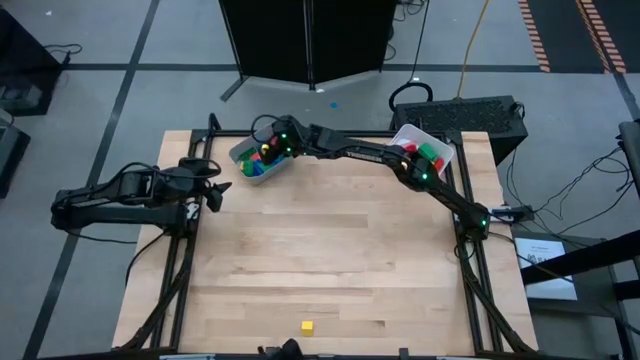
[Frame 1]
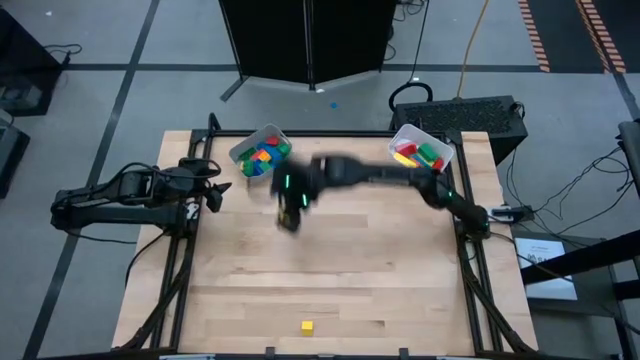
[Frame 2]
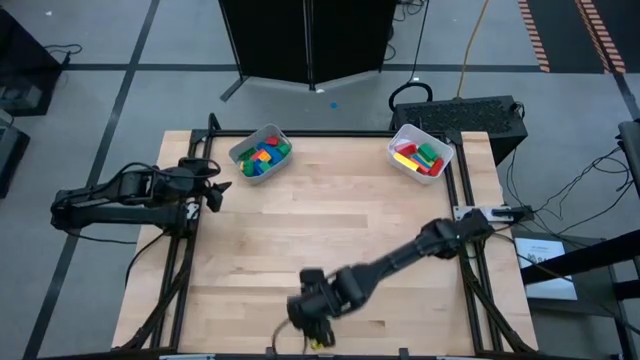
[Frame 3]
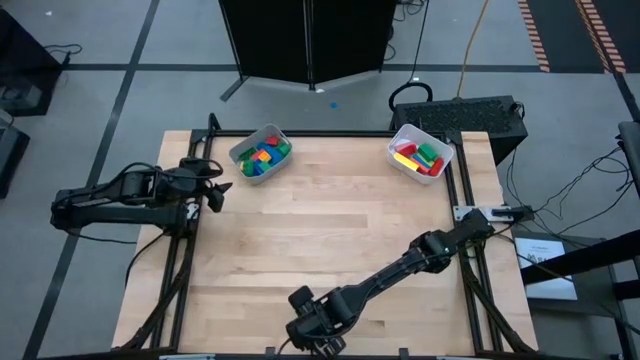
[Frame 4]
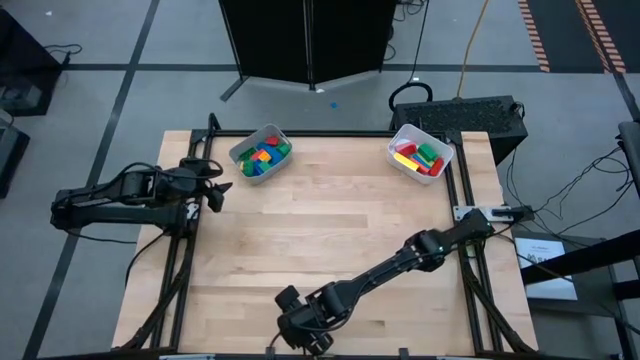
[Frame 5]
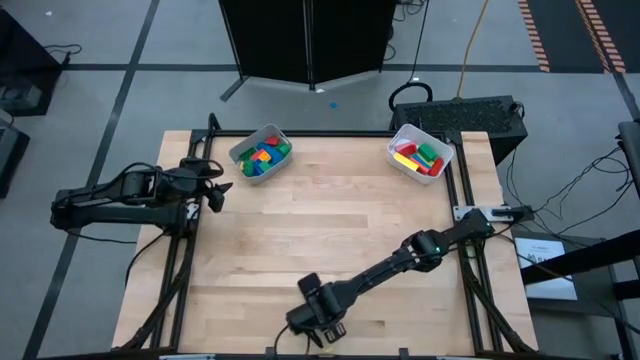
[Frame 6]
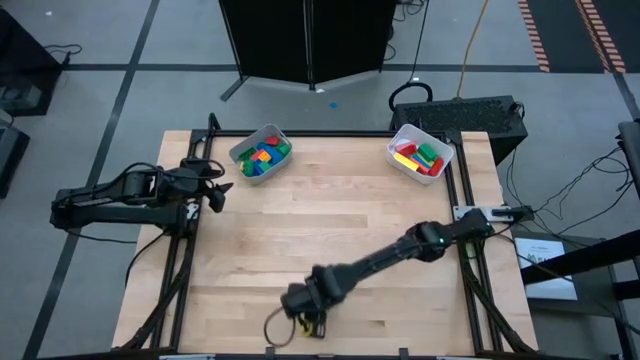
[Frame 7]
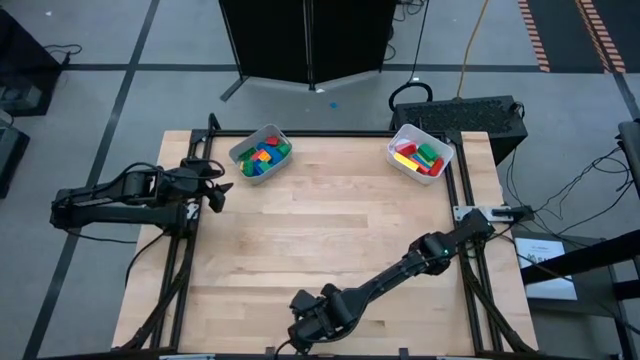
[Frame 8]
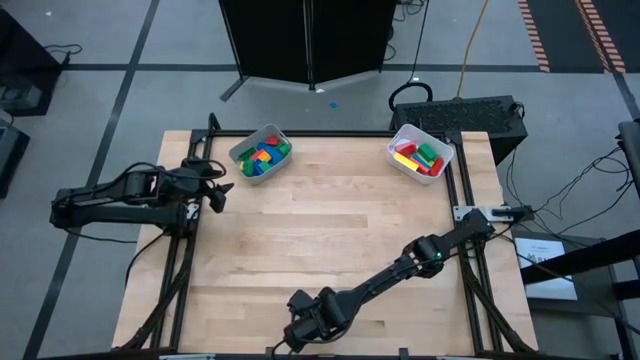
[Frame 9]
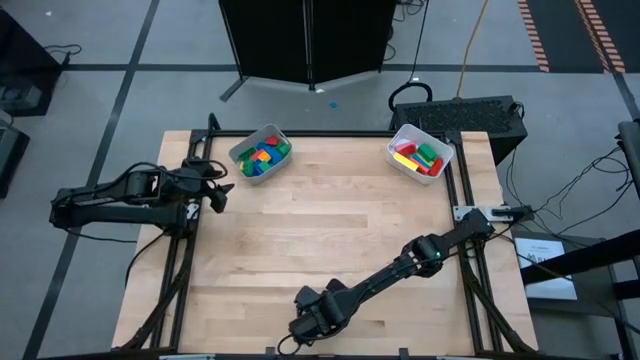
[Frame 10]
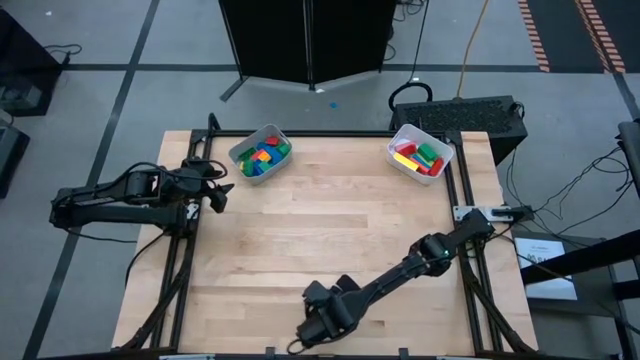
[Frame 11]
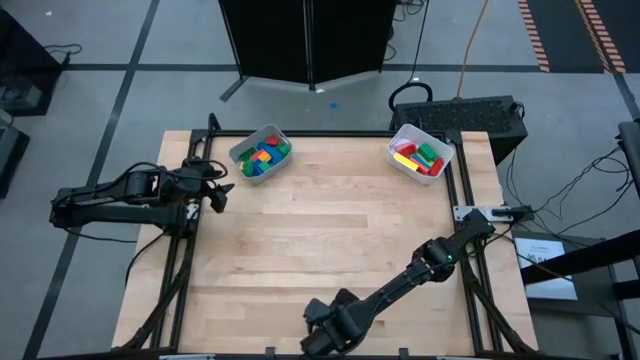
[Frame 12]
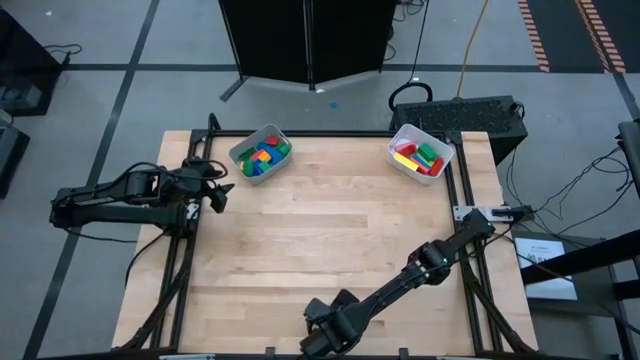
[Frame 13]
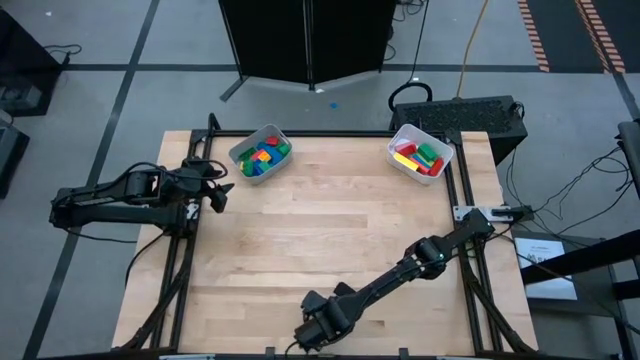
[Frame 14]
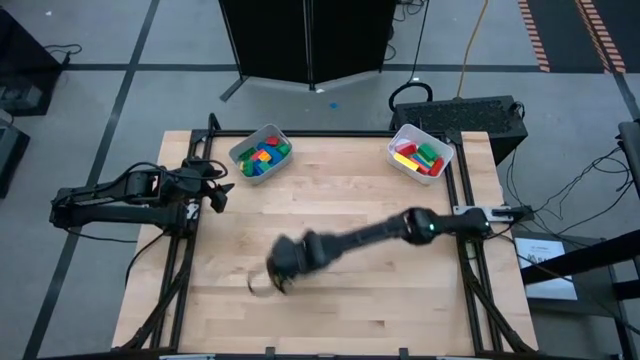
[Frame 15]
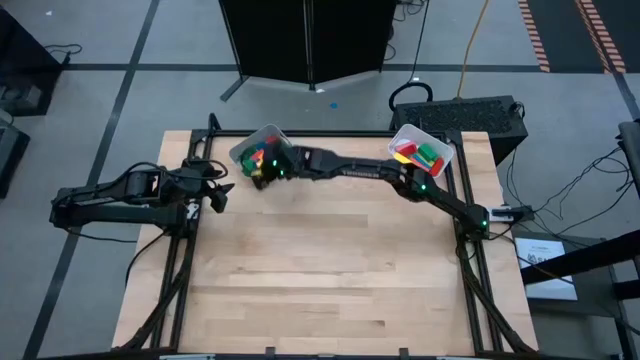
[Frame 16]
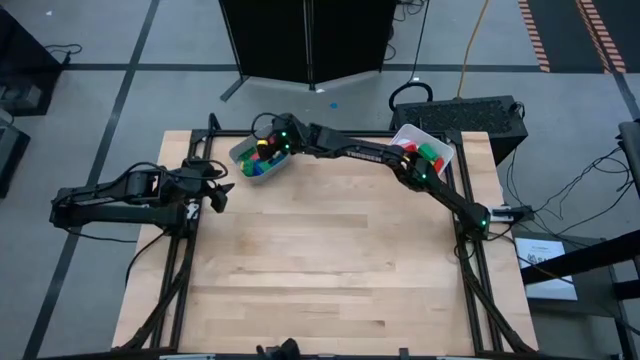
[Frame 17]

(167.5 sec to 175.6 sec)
Task: Sort blocks by size
Put the triangular yellow block into the gray bin

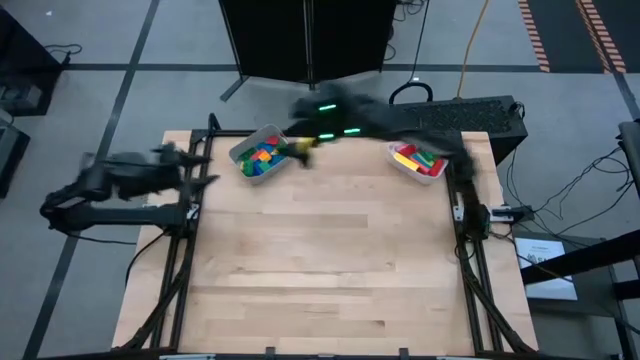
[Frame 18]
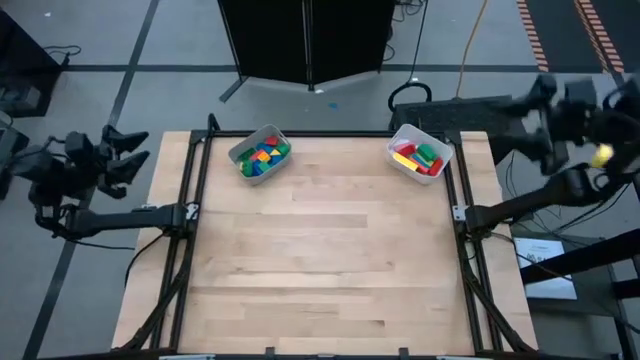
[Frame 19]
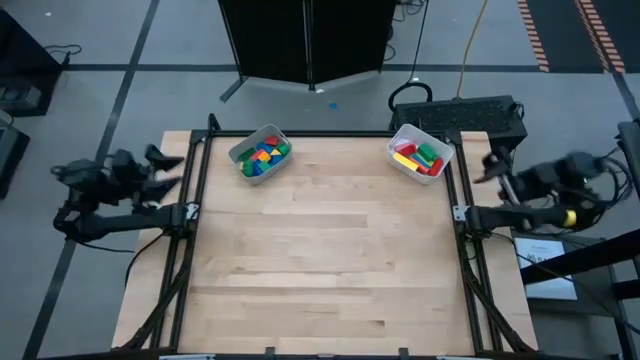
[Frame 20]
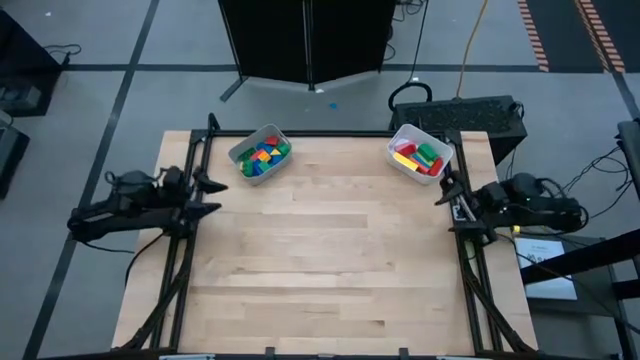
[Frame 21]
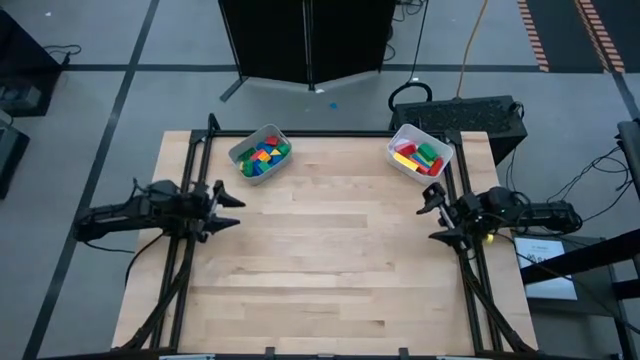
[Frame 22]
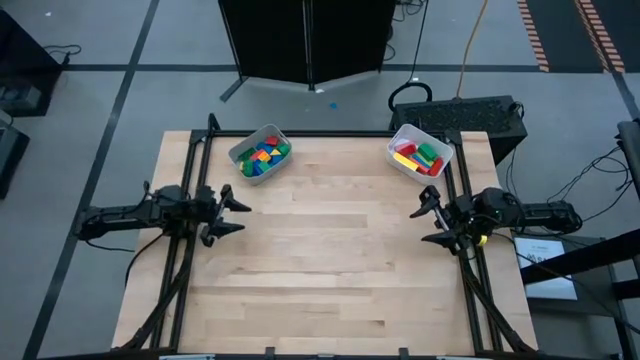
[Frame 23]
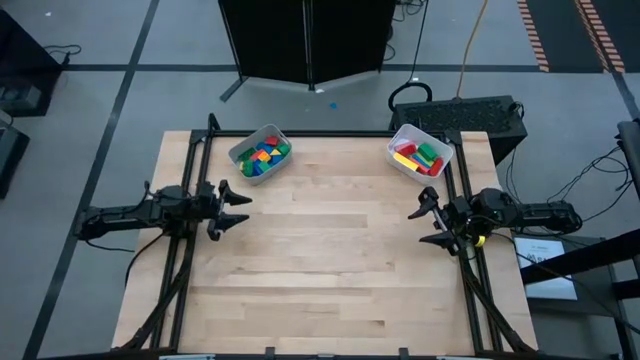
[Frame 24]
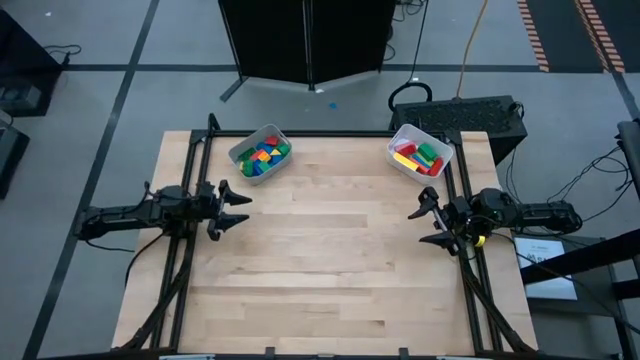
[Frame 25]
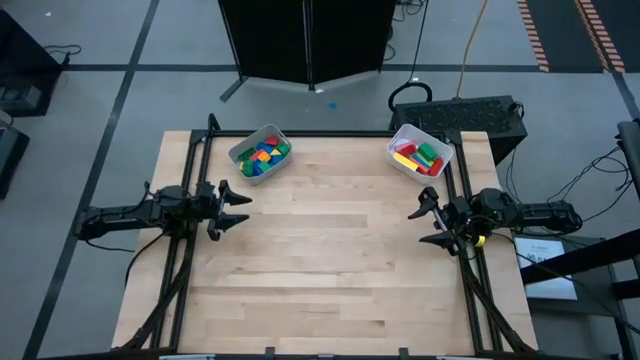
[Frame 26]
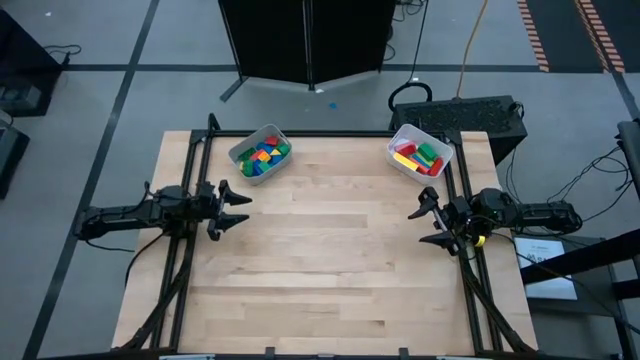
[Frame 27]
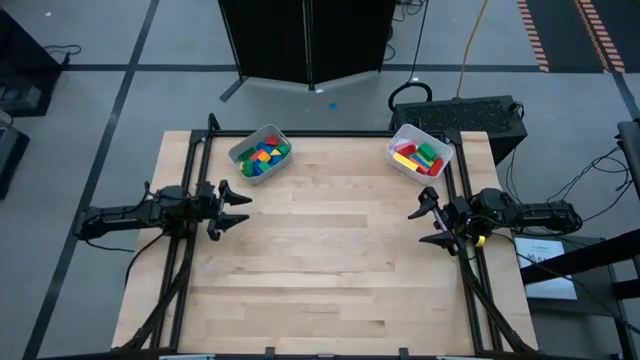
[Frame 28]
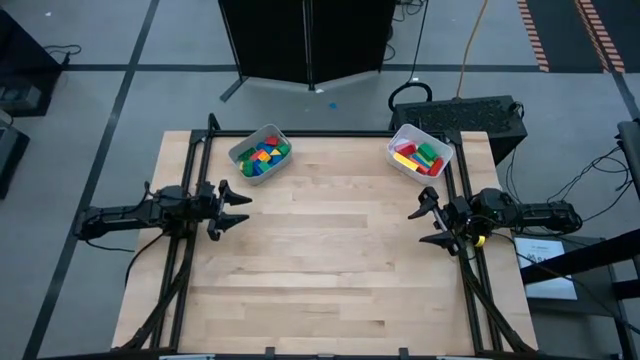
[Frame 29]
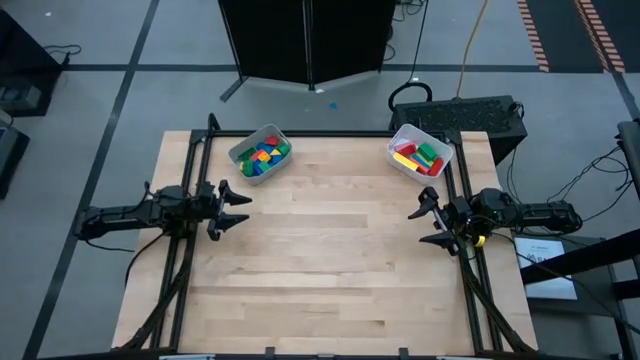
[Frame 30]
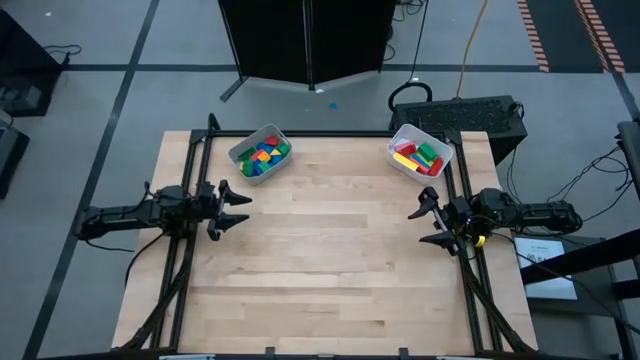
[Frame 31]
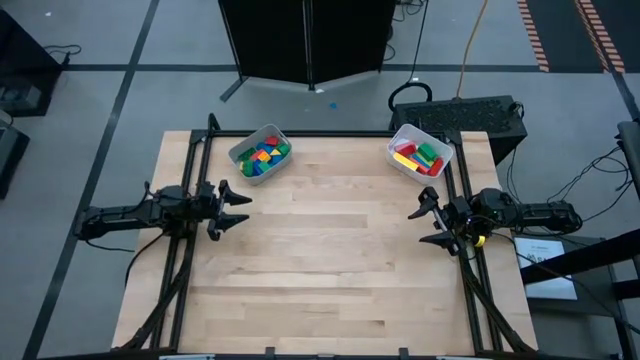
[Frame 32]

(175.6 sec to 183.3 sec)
Return to Home Position

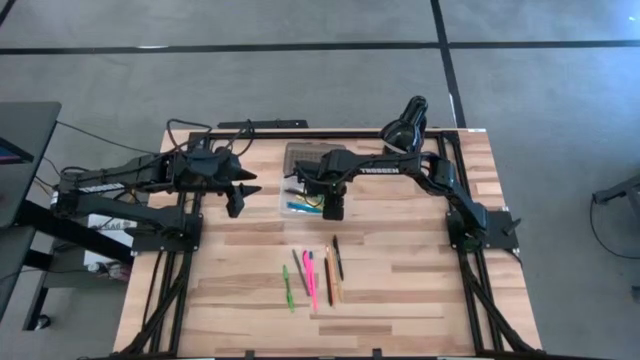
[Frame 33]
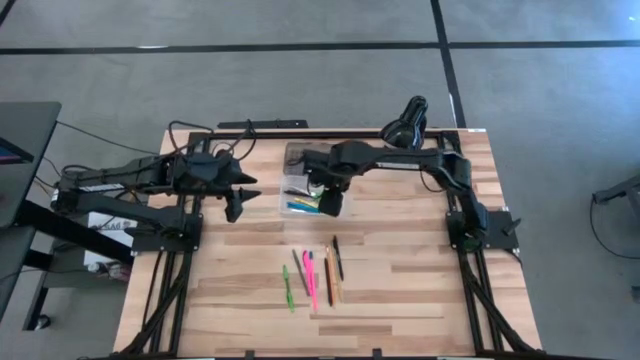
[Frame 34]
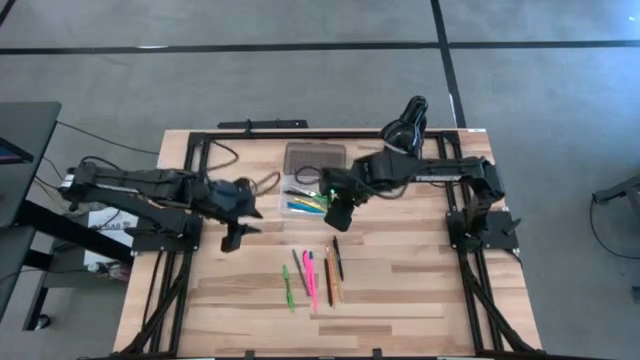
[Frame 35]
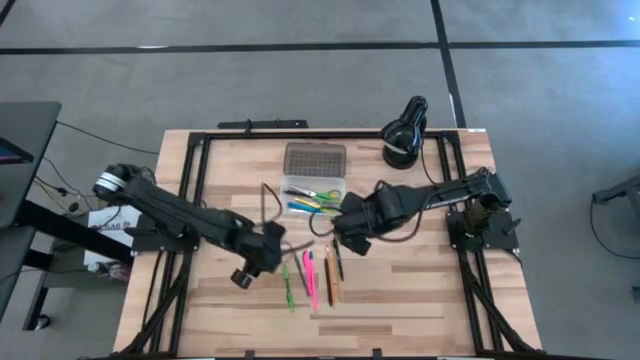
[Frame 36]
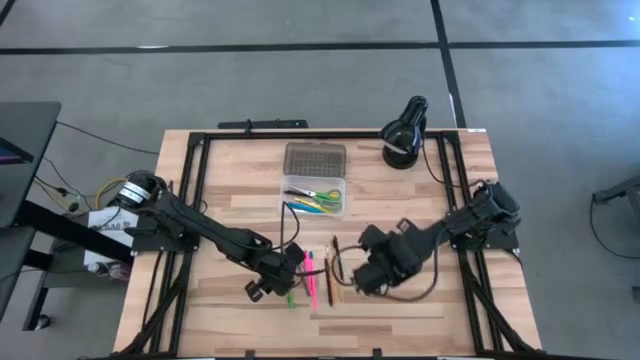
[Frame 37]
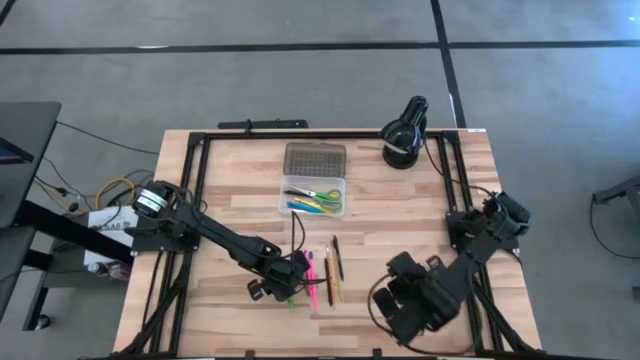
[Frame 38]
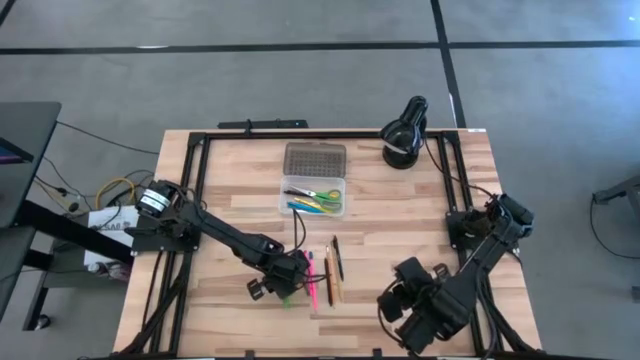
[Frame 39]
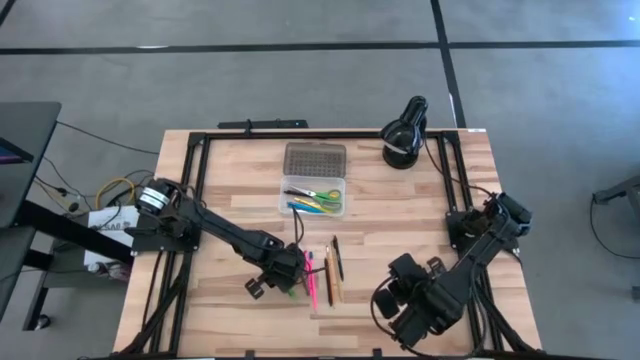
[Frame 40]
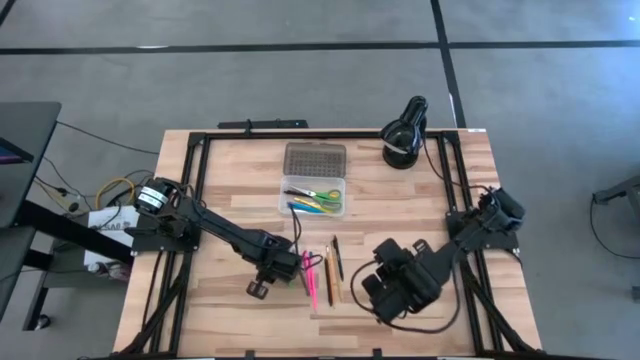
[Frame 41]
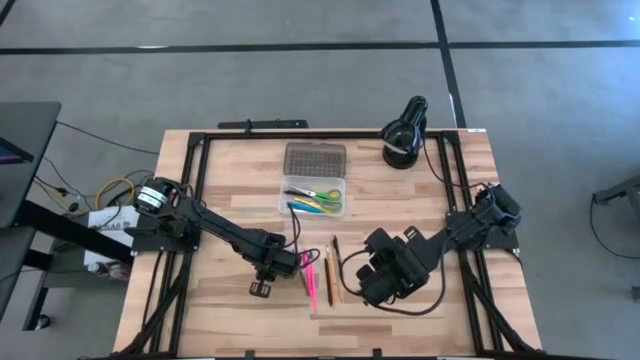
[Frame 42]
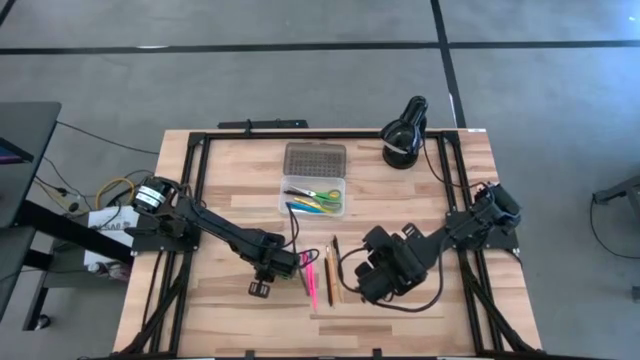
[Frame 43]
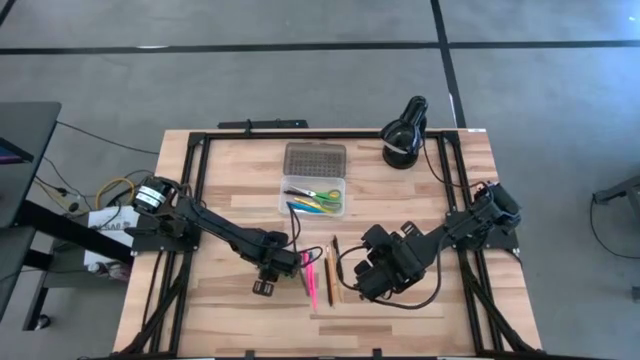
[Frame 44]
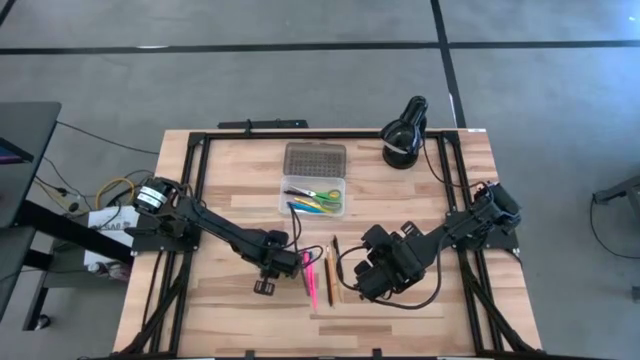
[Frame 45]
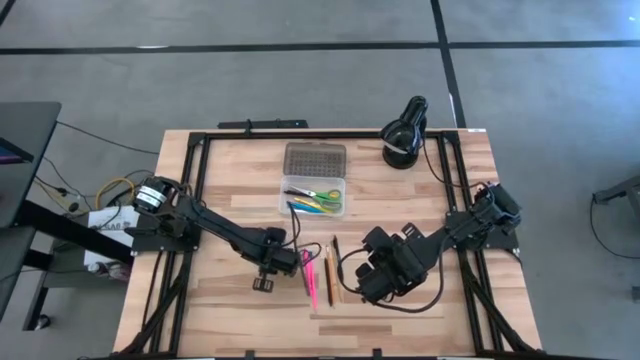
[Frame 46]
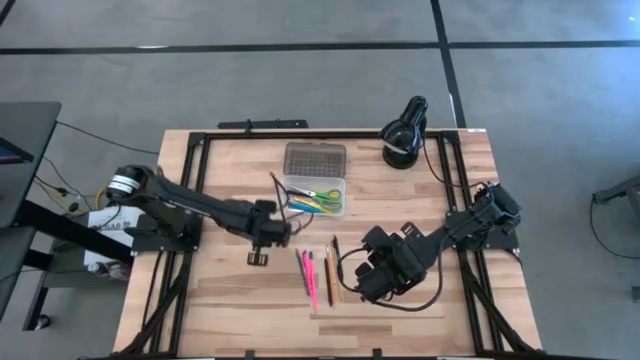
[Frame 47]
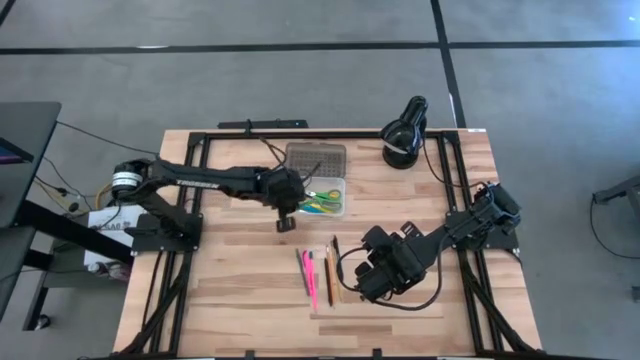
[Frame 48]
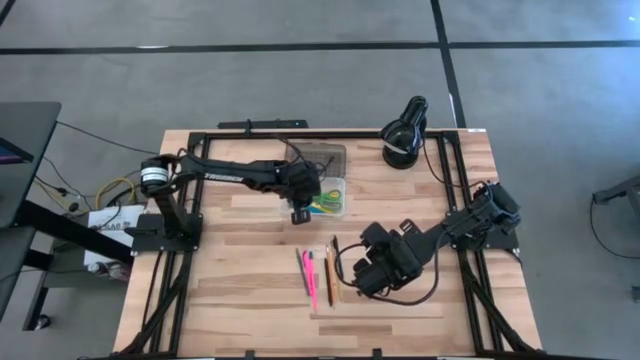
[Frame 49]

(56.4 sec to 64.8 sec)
Task: Pick & place school supplies into a supply box
Put the green pen into the supply box
